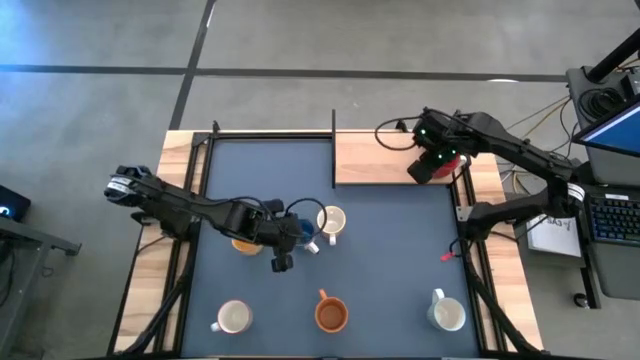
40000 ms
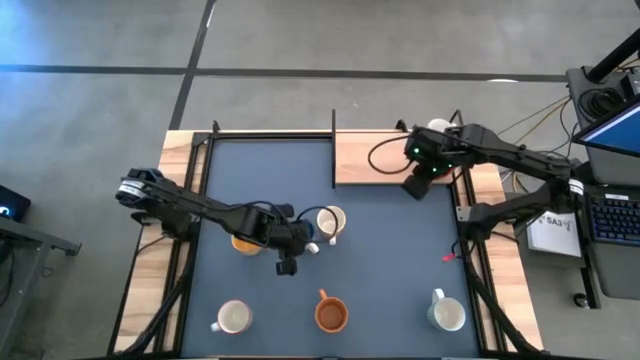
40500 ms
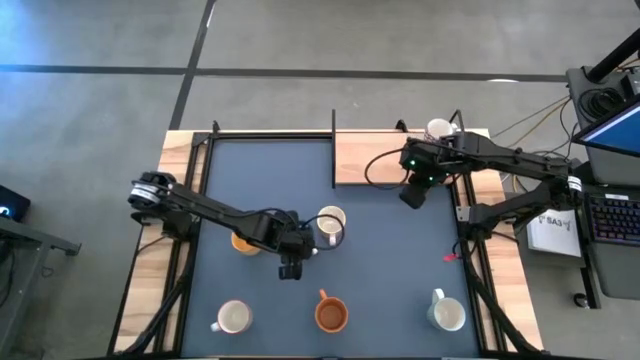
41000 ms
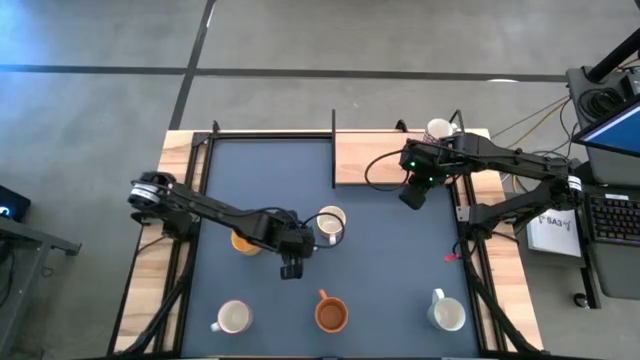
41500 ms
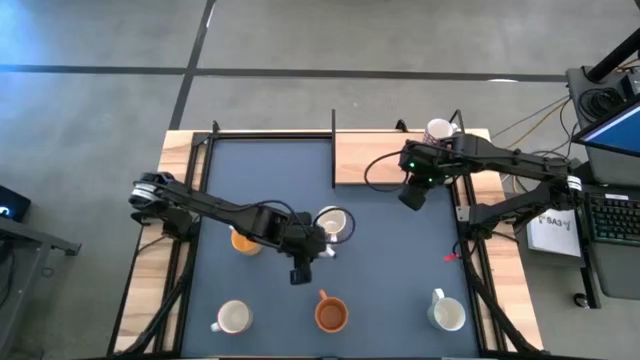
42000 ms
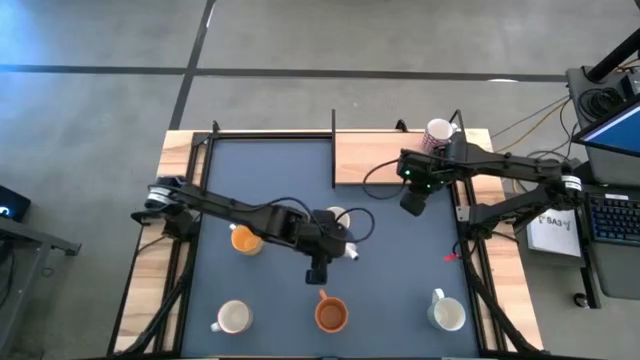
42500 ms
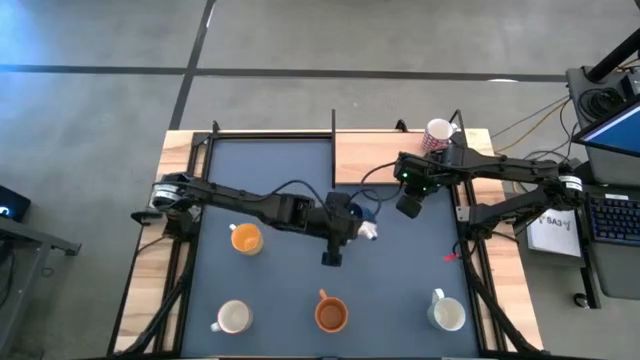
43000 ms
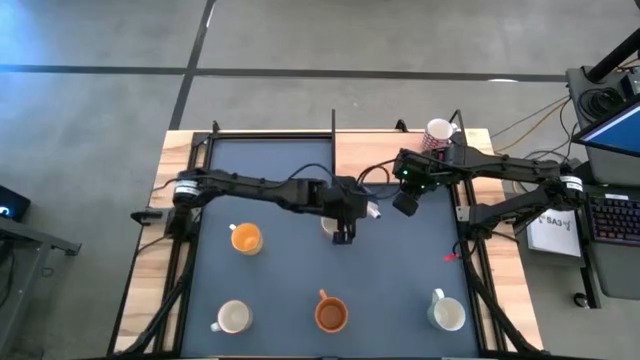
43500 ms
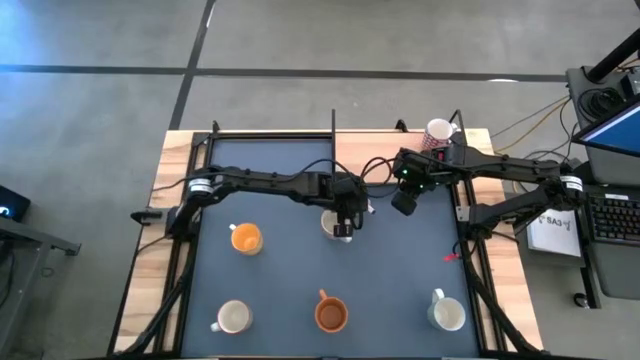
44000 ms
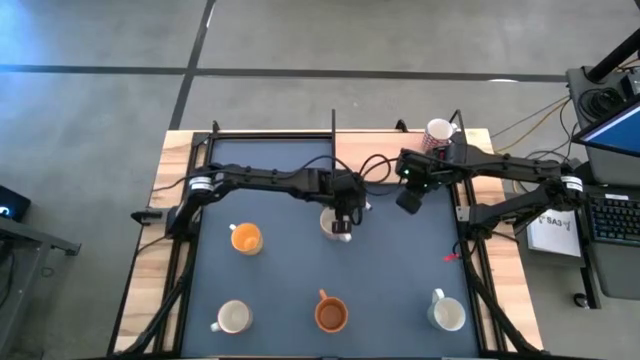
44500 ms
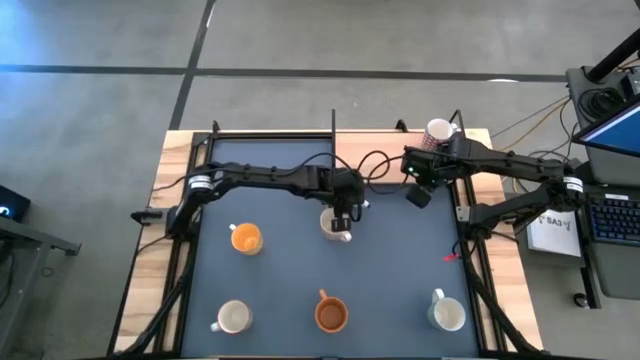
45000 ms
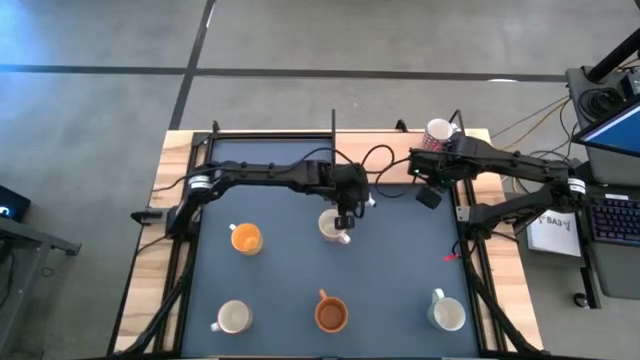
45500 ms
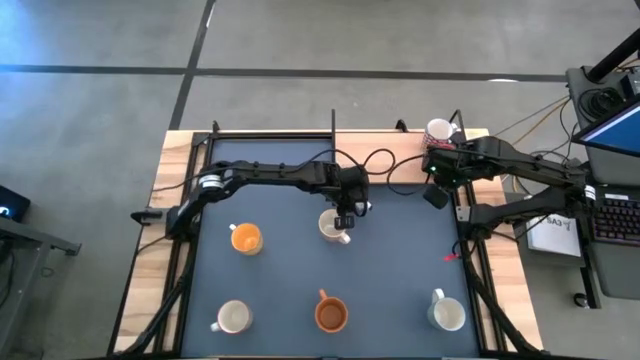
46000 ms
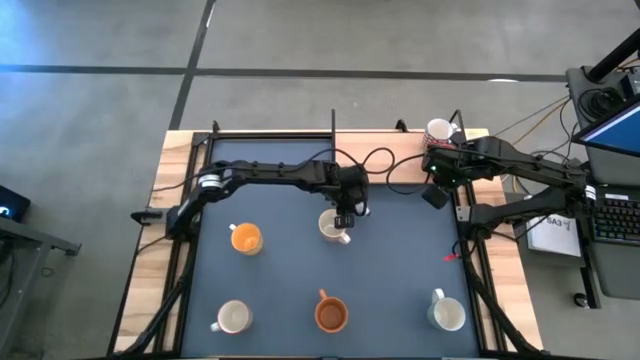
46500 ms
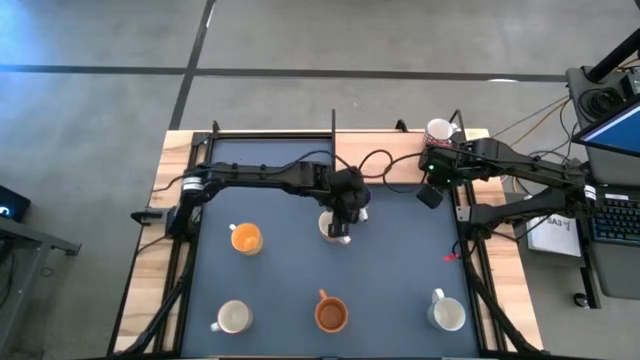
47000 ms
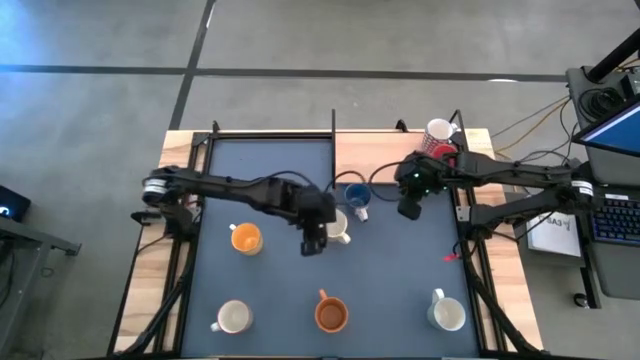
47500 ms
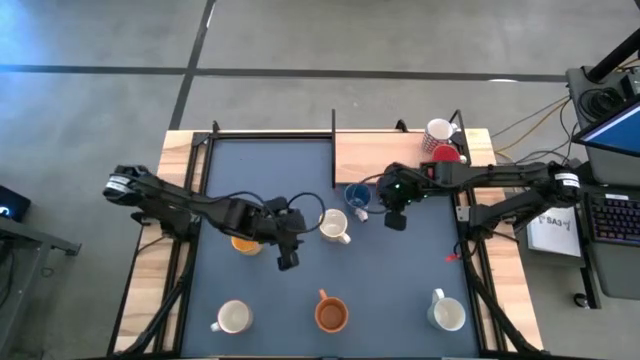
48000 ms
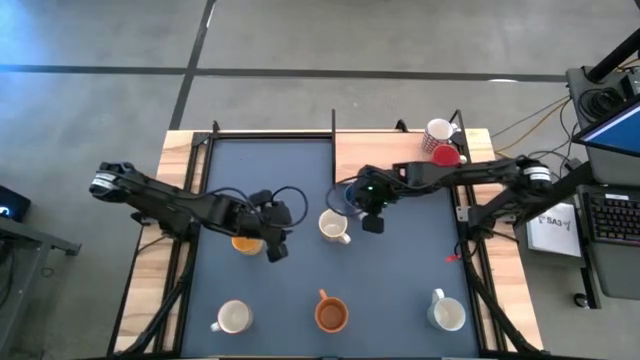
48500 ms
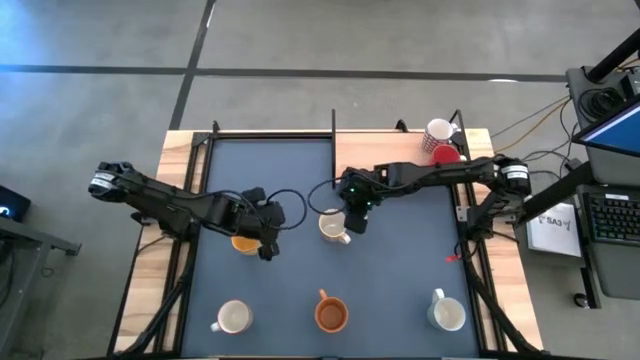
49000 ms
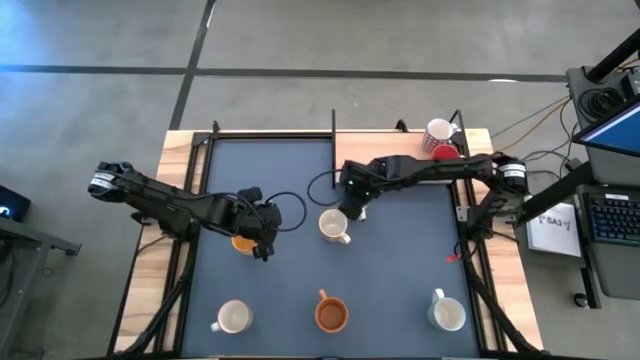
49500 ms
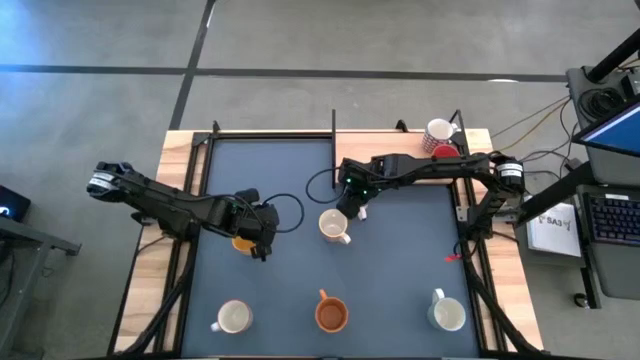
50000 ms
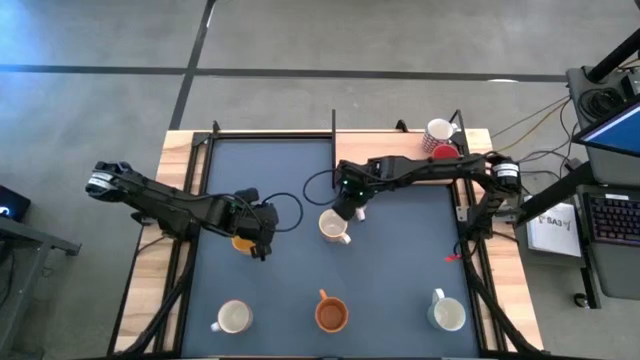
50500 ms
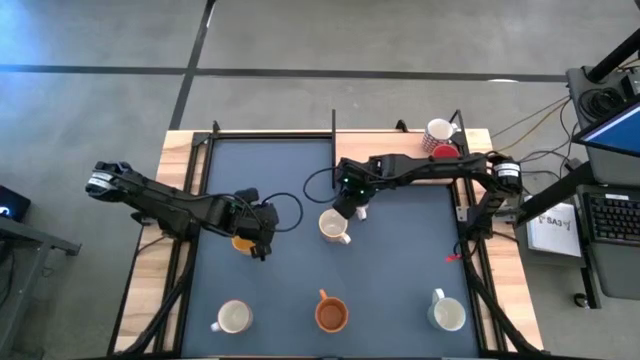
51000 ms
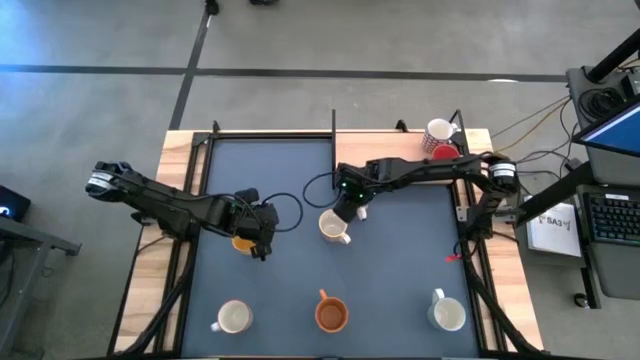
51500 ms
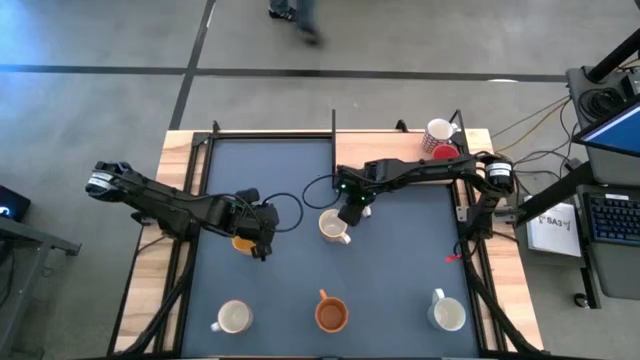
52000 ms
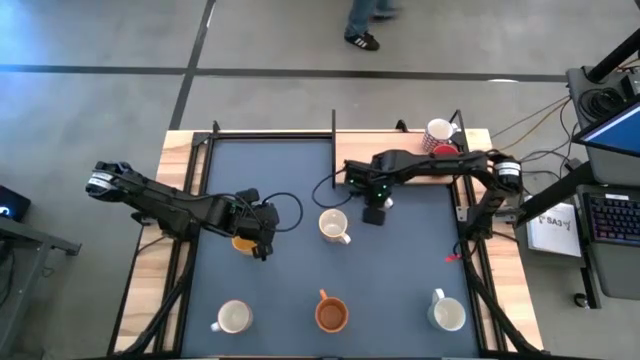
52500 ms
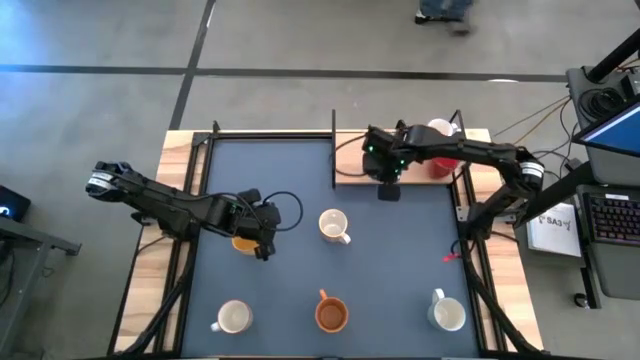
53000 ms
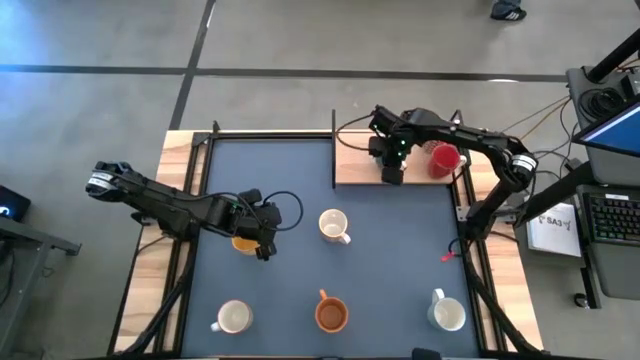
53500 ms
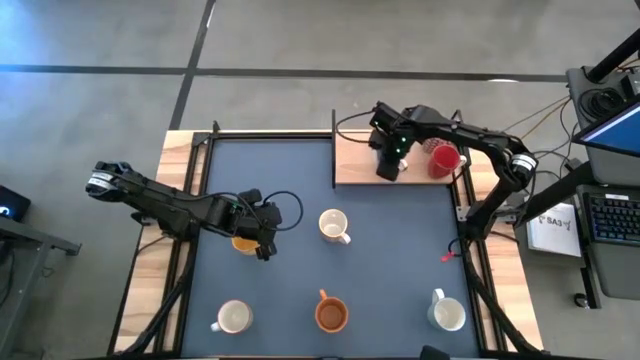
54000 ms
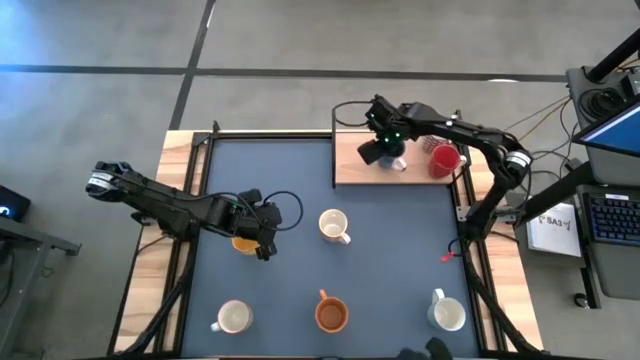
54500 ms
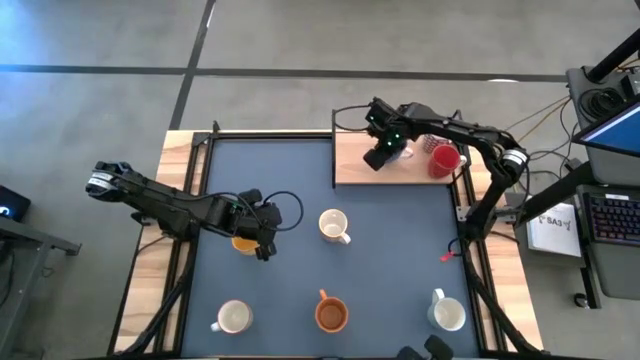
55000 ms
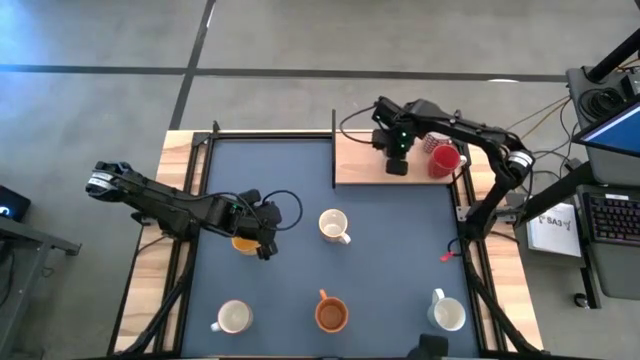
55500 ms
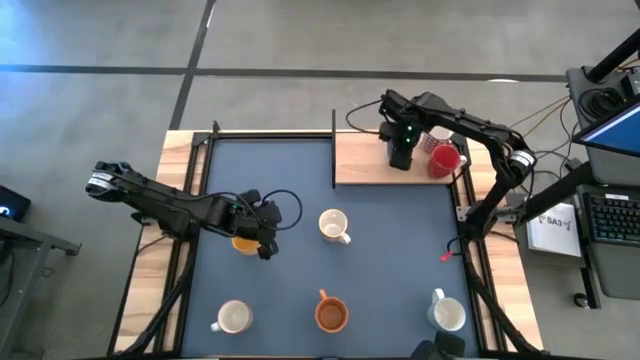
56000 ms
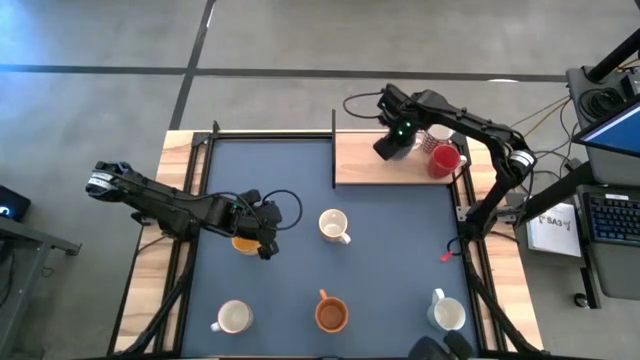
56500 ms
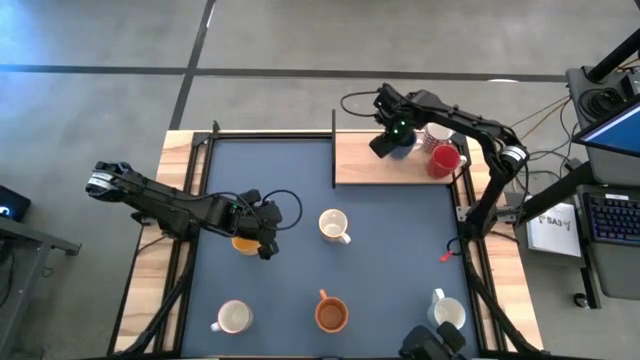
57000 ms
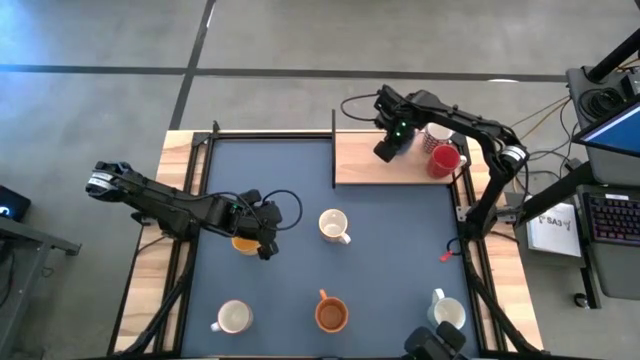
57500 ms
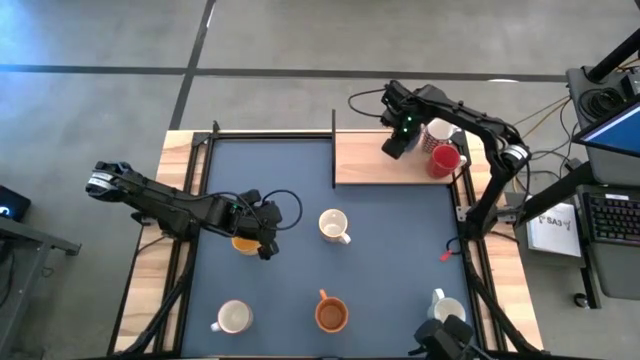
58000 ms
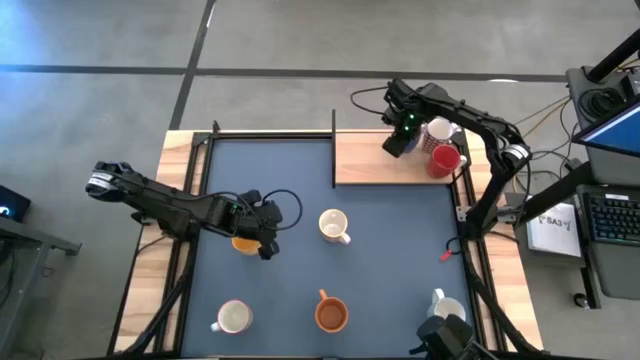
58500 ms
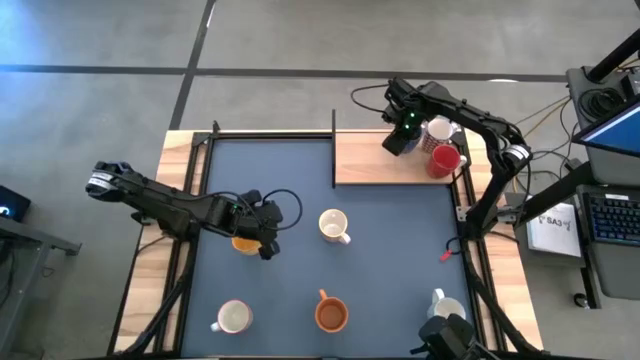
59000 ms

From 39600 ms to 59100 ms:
Task: Place coffee mugs
Put the blue mug on the shelf

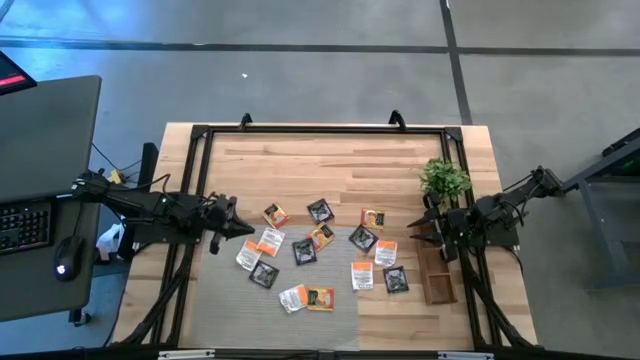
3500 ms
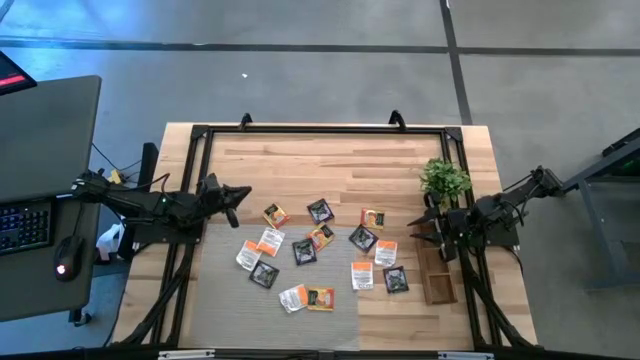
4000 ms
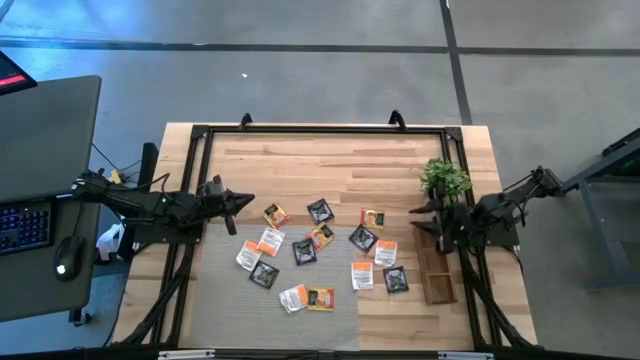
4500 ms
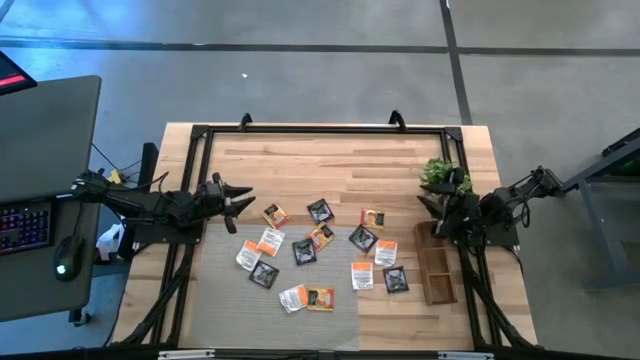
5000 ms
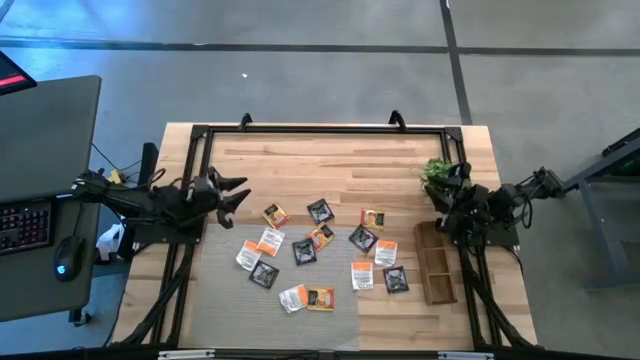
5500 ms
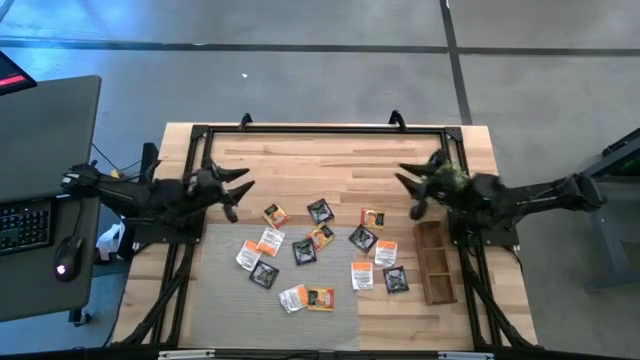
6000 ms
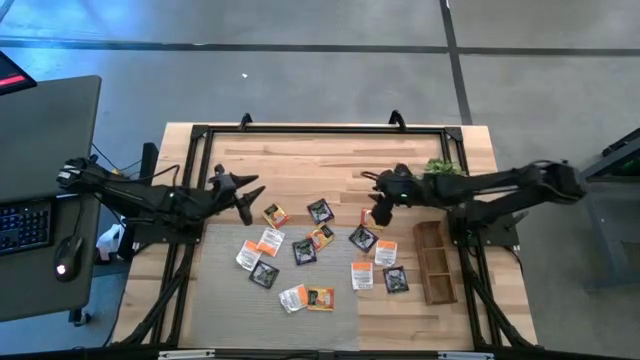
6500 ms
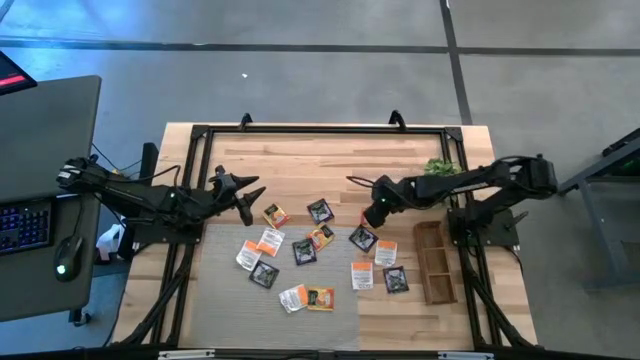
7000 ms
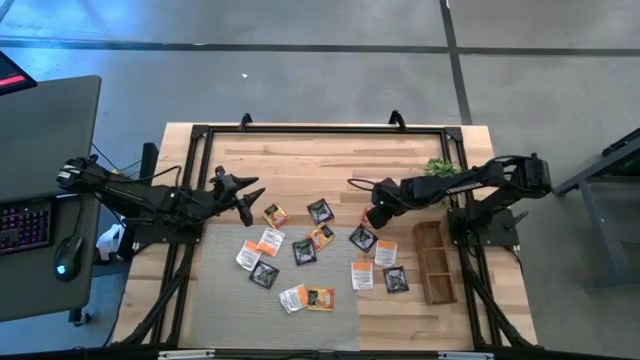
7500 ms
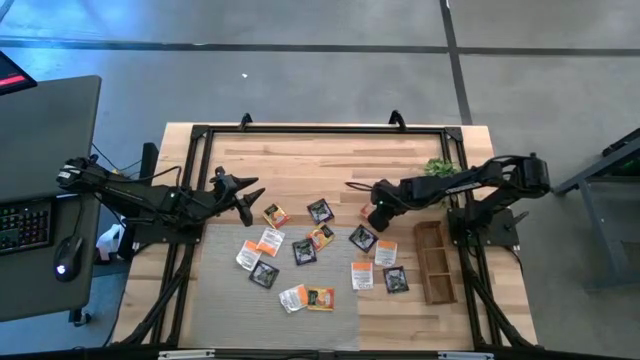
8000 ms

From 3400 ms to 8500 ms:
Task: Pick & Place Tea
Put the orange tea bag into the top section of the wooden organizer
